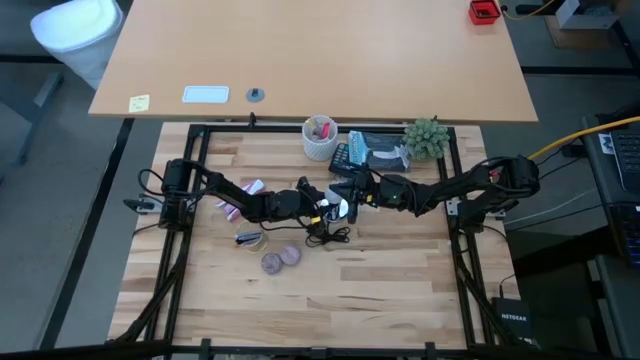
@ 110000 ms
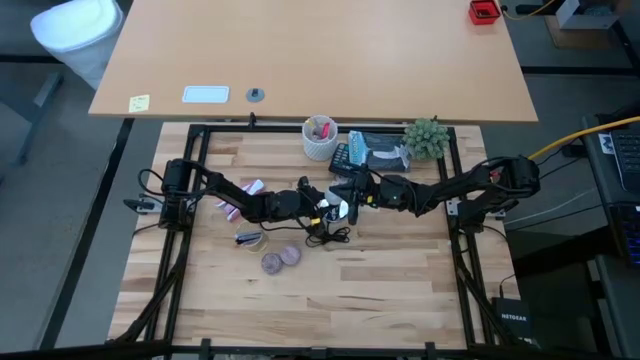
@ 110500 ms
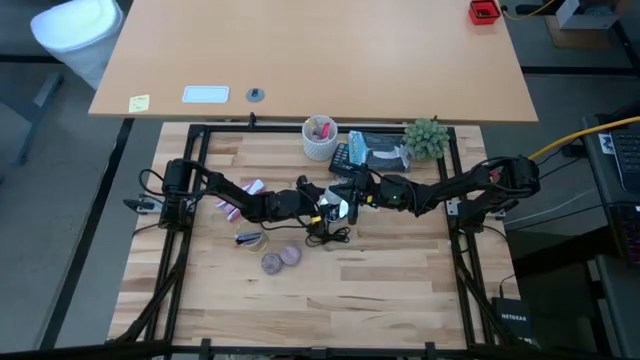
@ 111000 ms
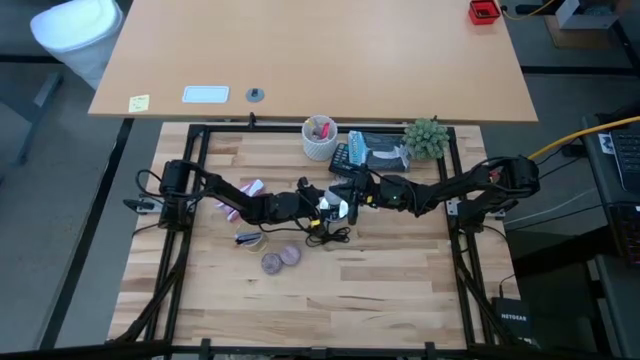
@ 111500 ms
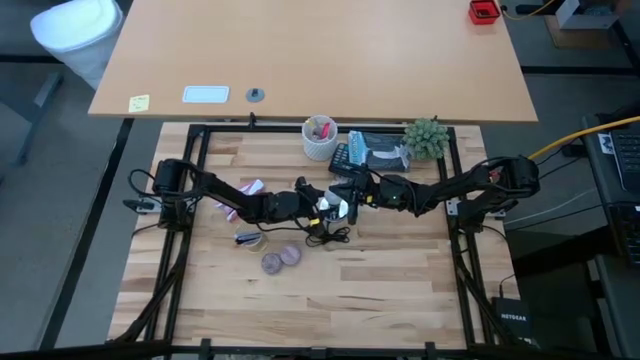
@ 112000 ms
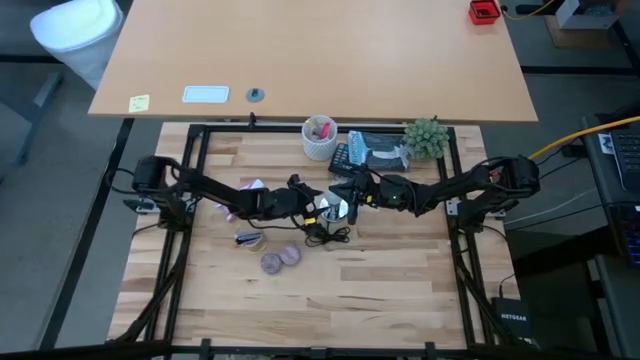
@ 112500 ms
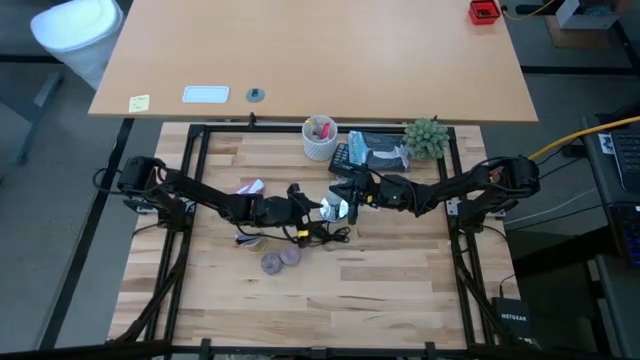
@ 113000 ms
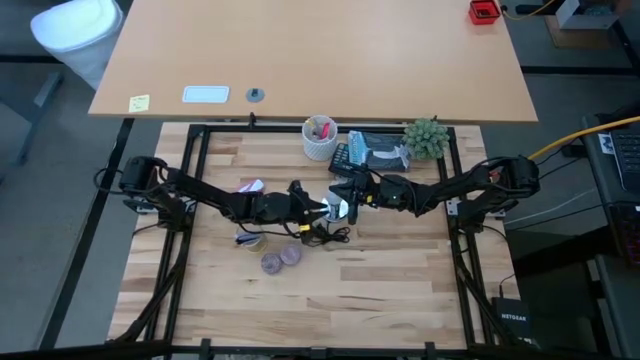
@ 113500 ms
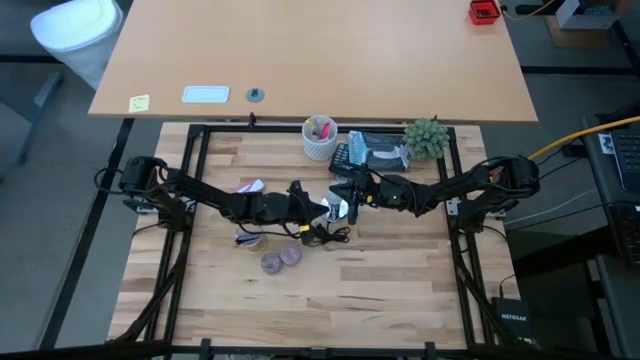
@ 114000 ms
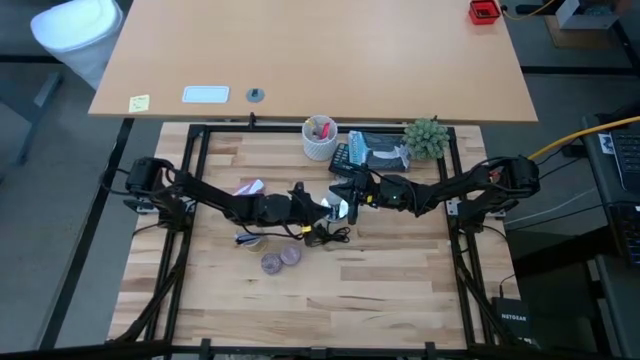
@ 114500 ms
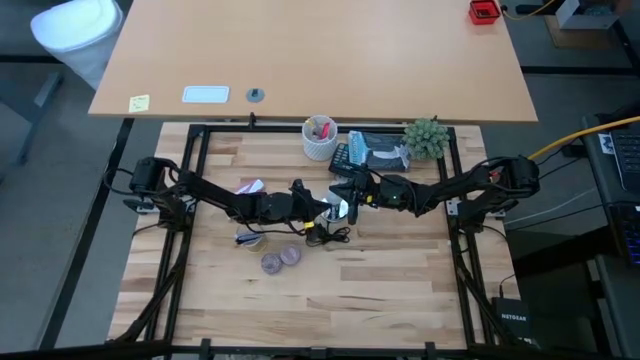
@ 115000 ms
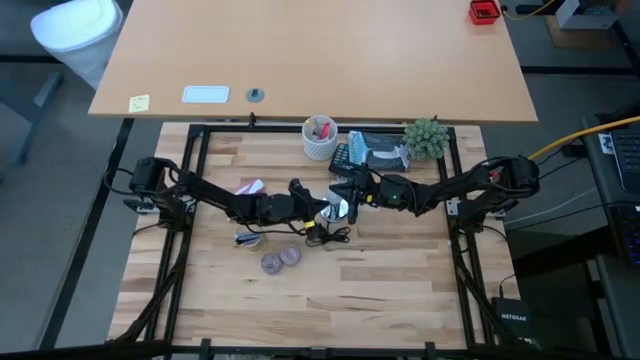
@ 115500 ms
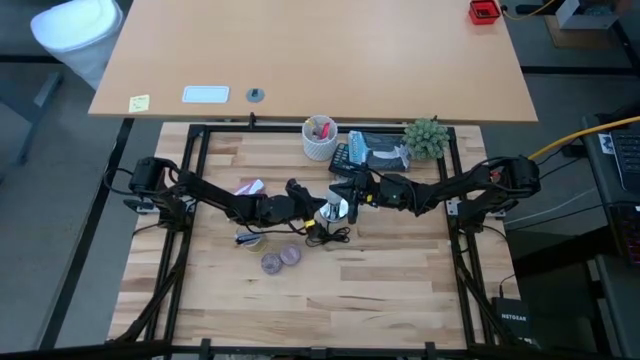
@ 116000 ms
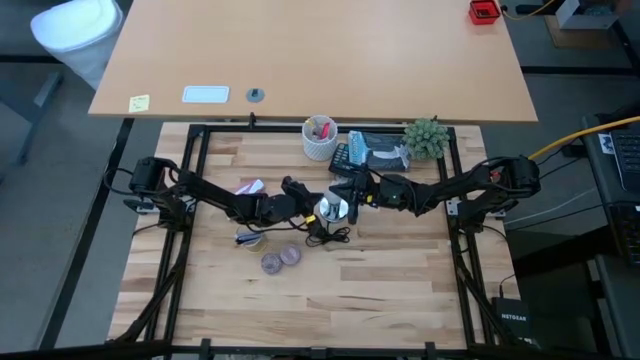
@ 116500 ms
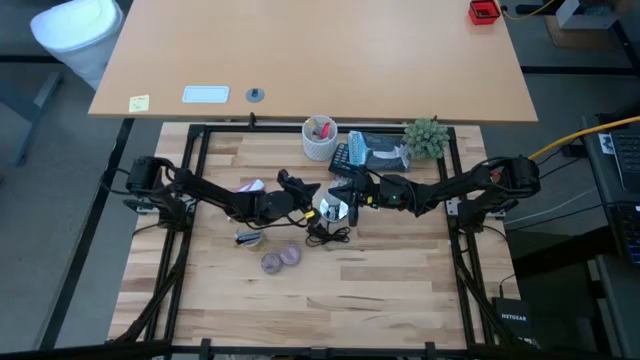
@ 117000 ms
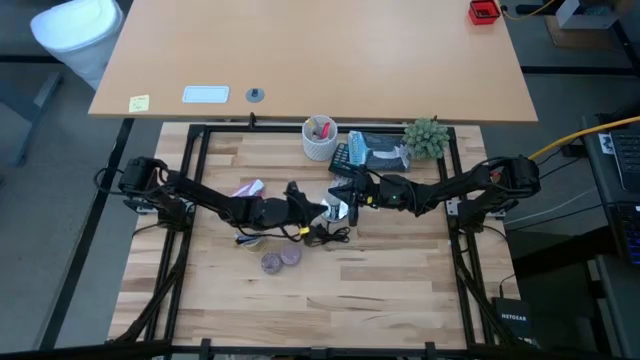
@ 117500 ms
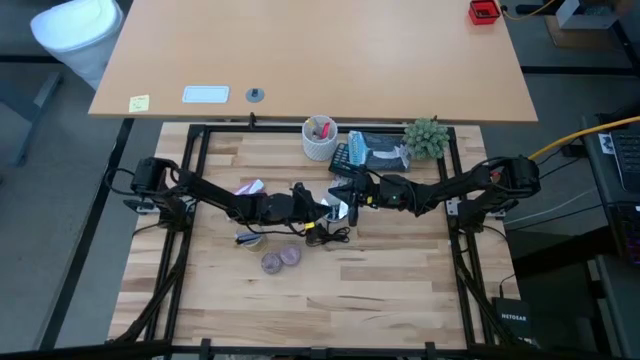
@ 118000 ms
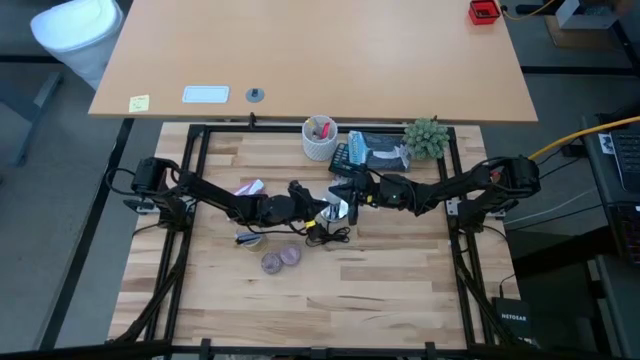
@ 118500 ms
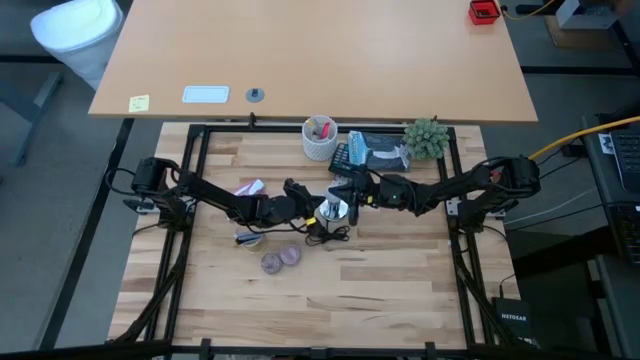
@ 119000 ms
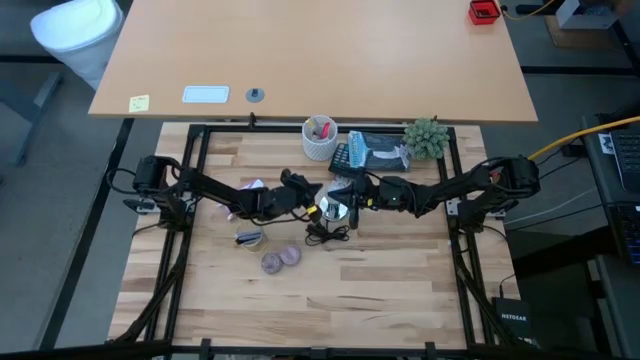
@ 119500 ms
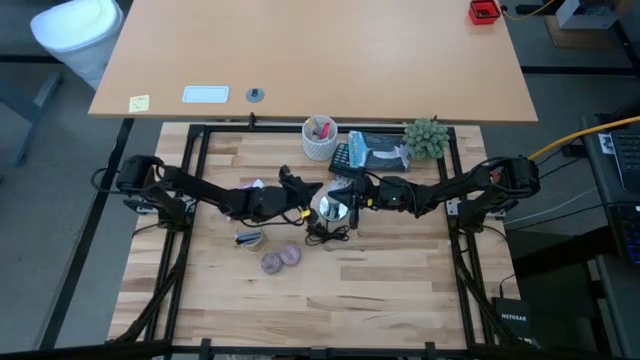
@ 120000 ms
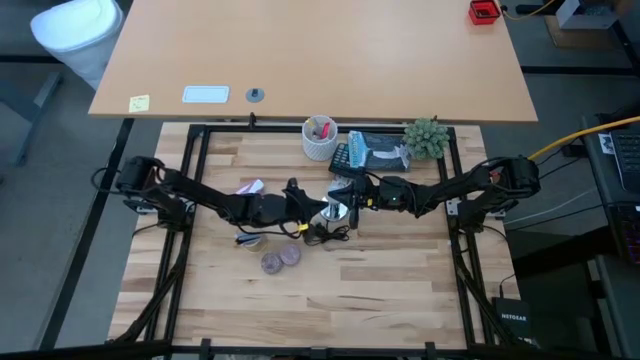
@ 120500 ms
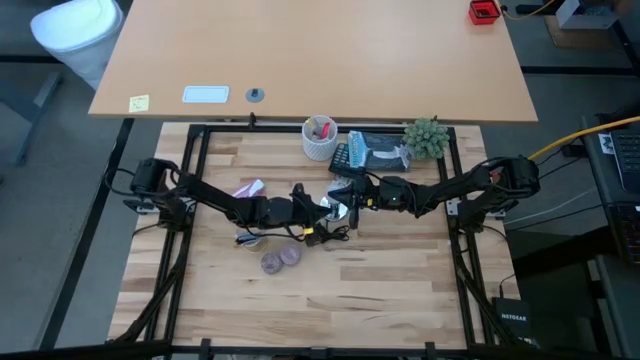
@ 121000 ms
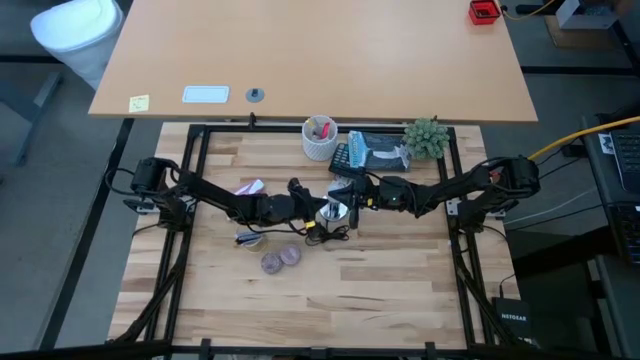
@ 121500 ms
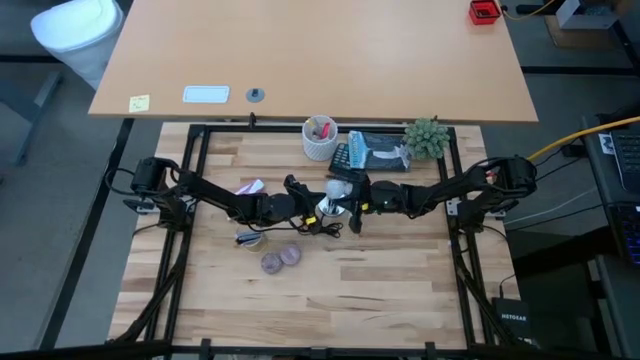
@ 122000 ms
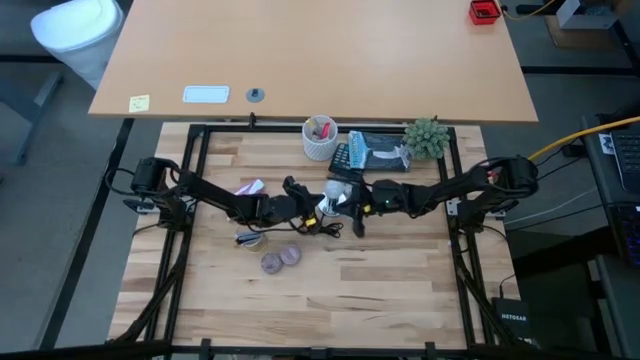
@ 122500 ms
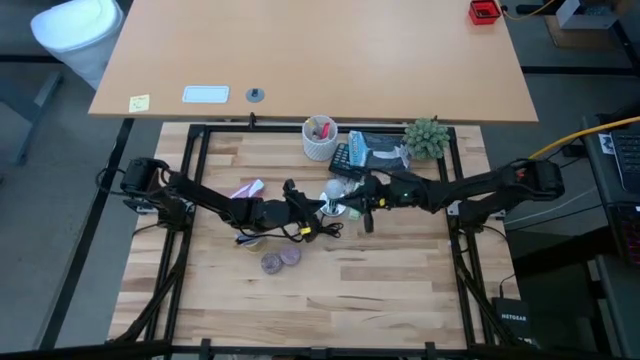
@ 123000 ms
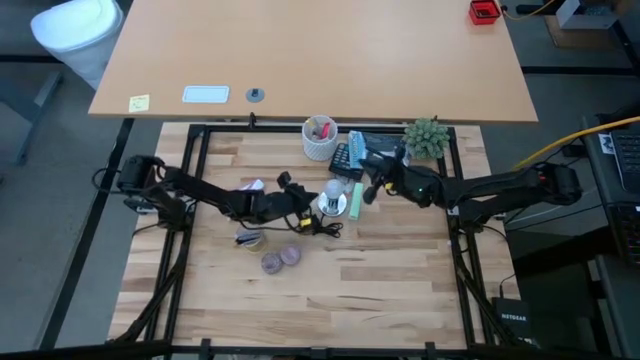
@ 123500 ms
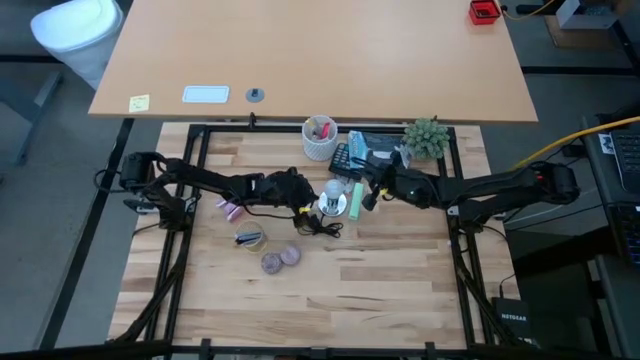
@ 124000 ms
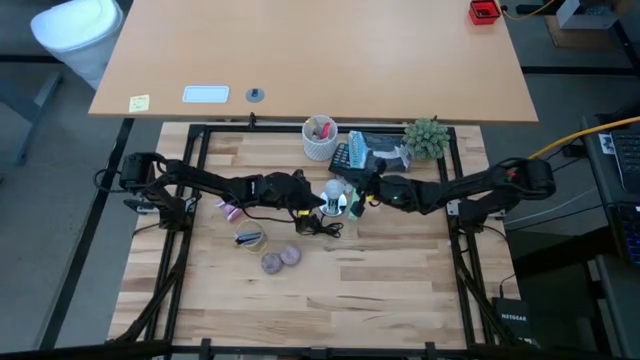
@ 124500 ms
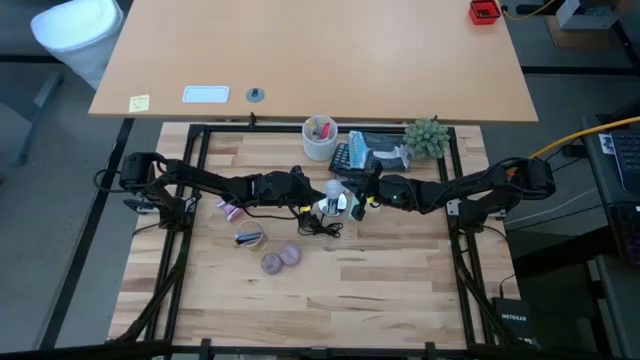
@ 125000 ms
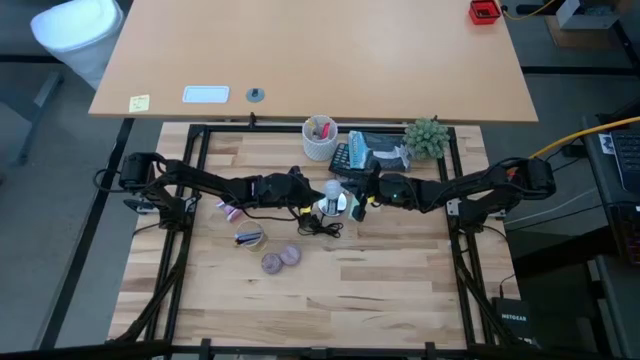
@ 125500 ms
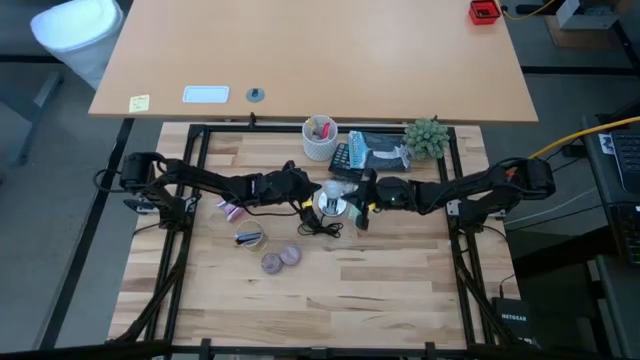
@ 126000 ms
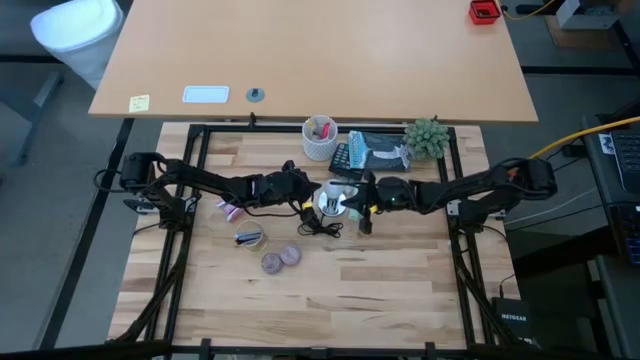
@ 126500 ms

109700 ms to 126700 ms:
Task: Screw lightbulb
Insert the white lightbulb into the silver lamp

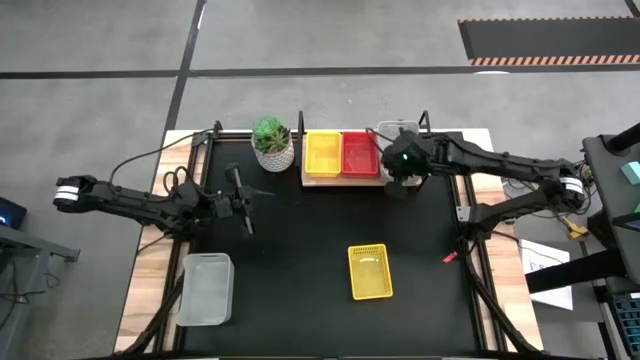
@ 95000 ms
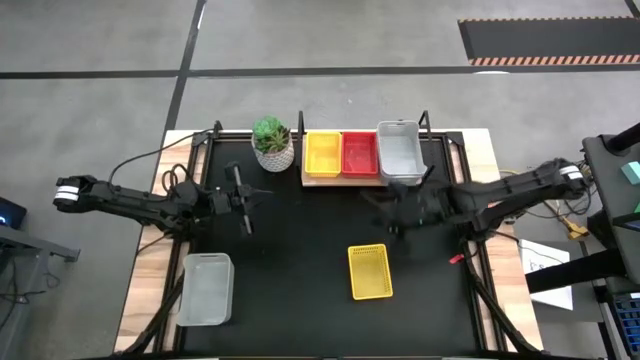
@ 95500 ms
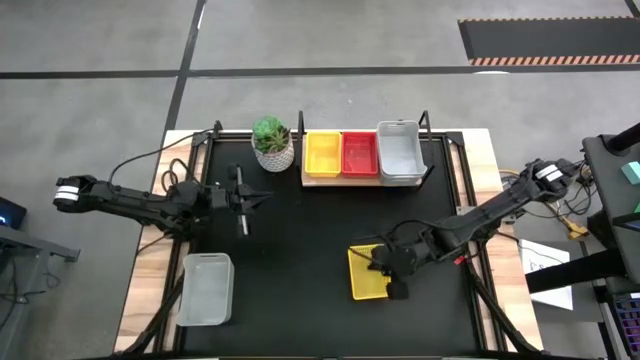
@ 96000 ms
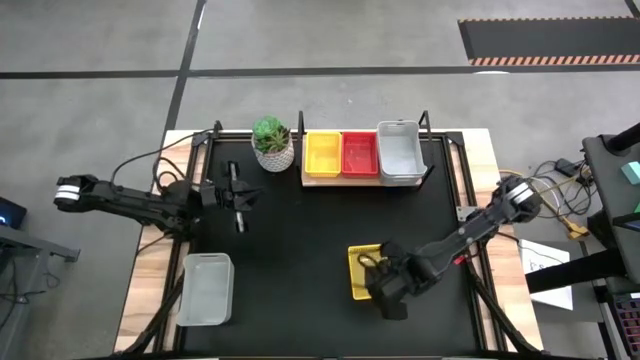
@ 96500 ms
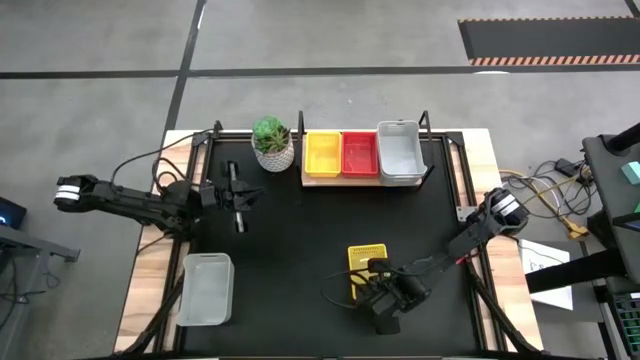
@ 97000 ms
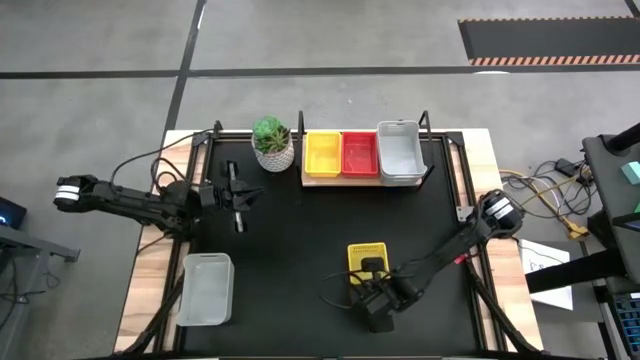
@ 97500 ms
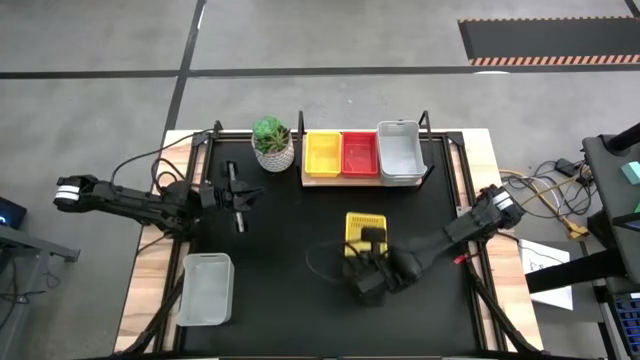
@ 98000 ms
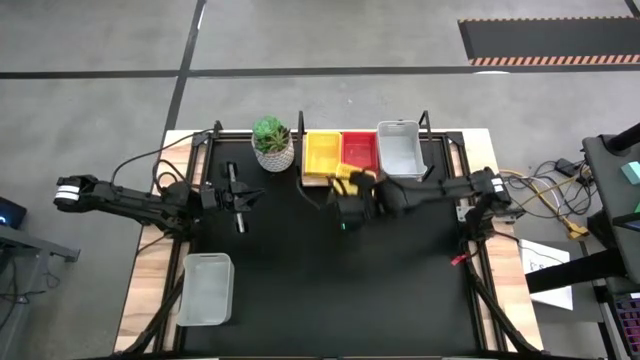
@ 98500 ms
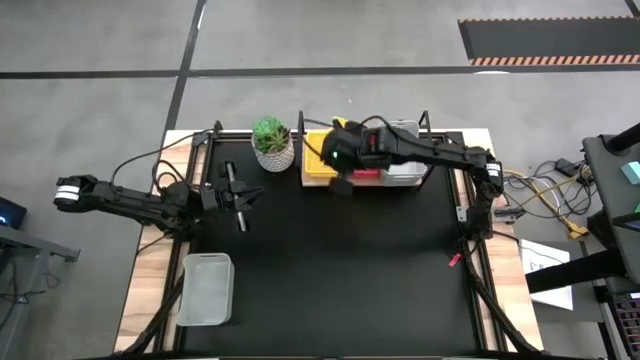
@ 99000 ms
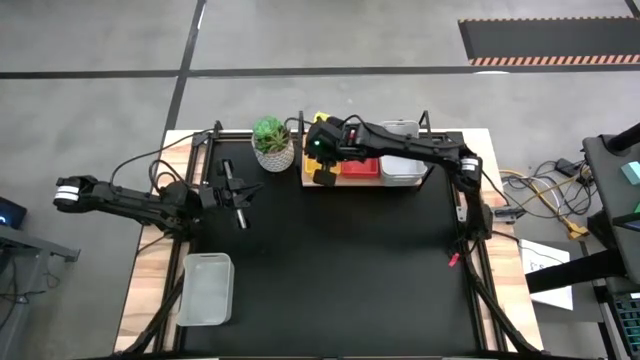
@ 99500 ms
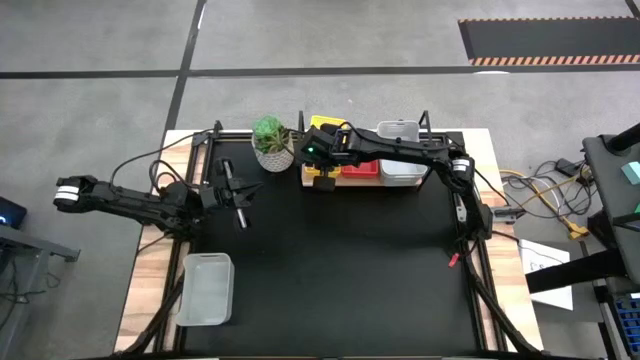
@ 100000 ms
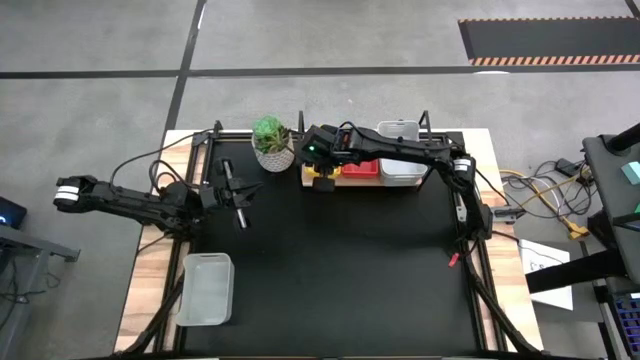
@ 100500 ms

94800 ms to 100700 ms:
Task: Stack baskets on shelf by color
Stack the yellow bin on top of the yellow bin on the shelf
